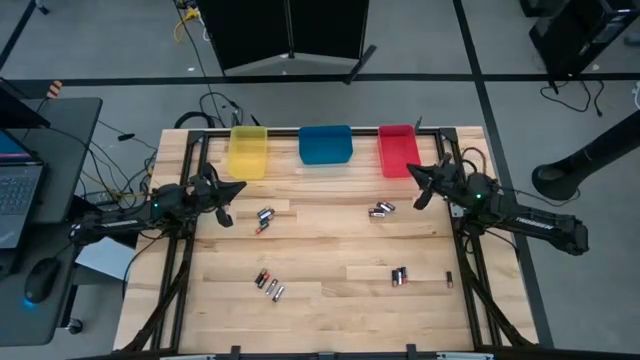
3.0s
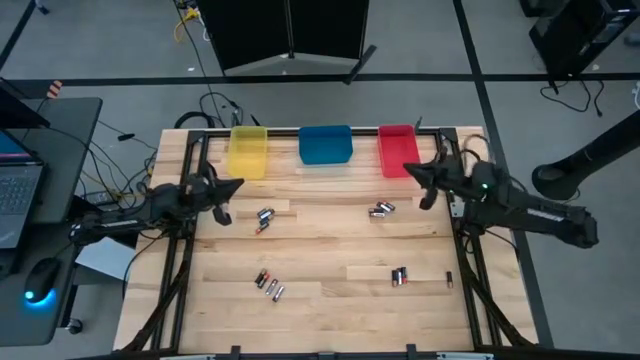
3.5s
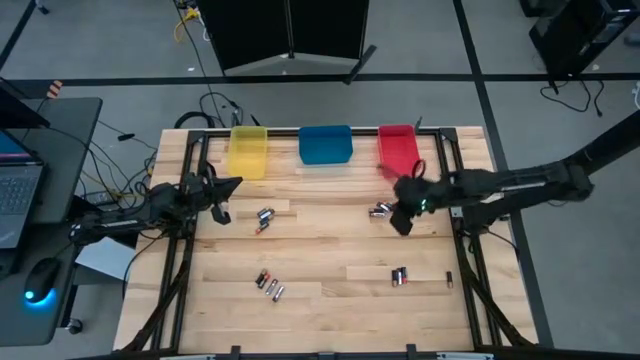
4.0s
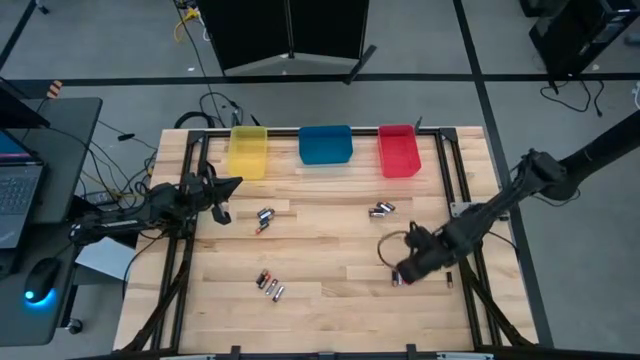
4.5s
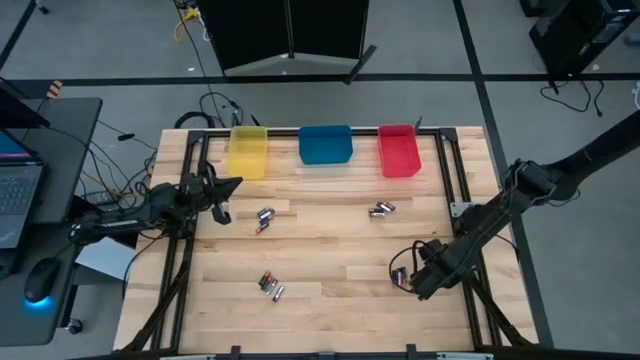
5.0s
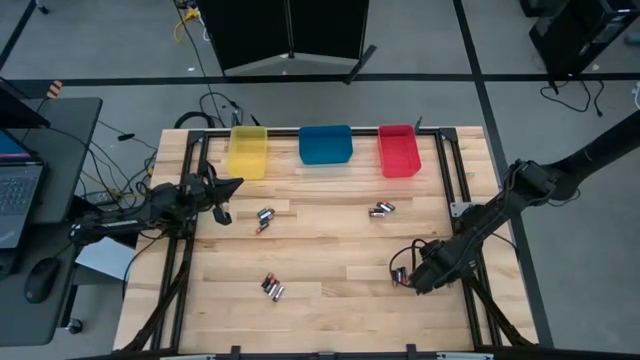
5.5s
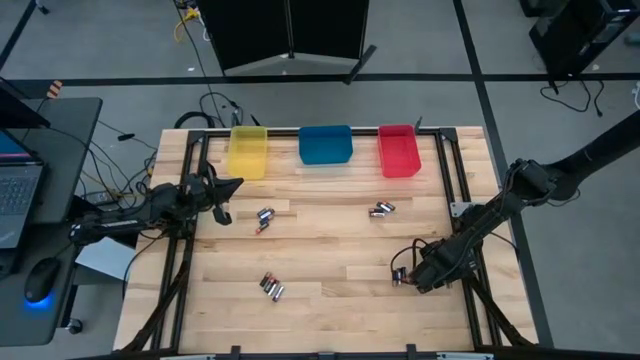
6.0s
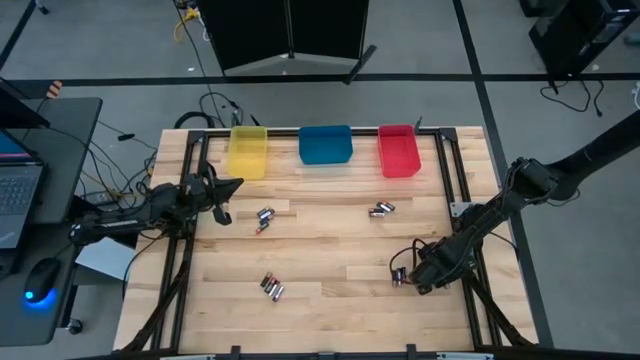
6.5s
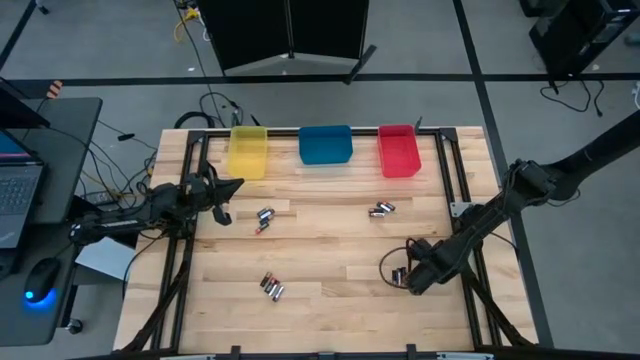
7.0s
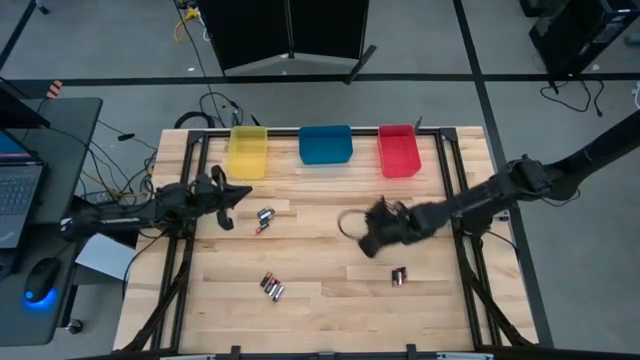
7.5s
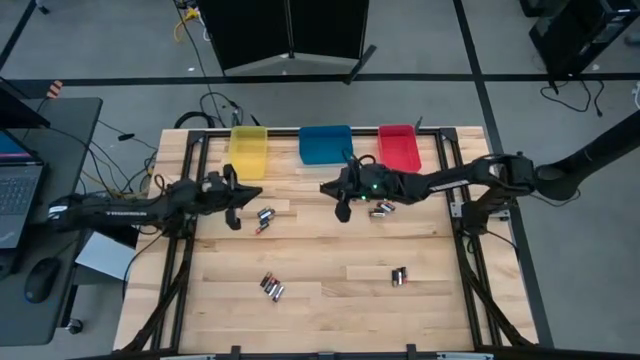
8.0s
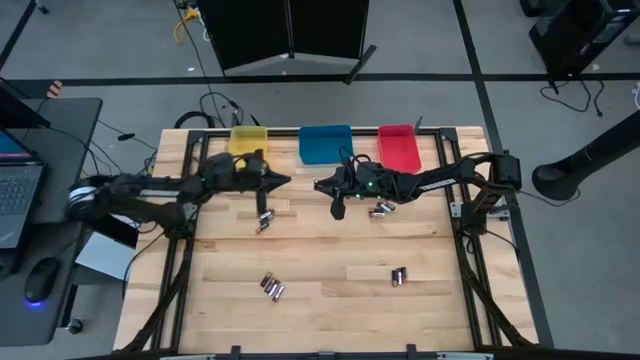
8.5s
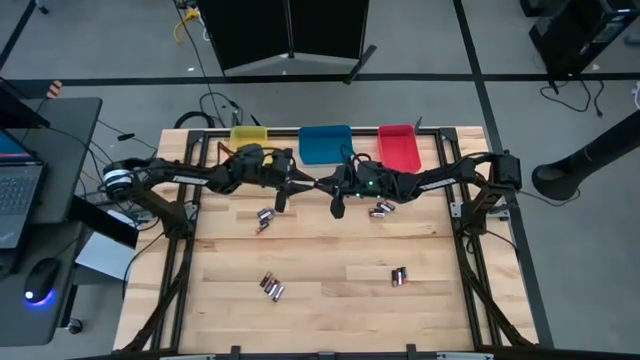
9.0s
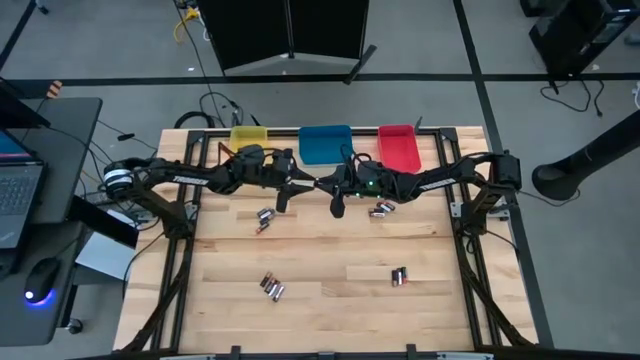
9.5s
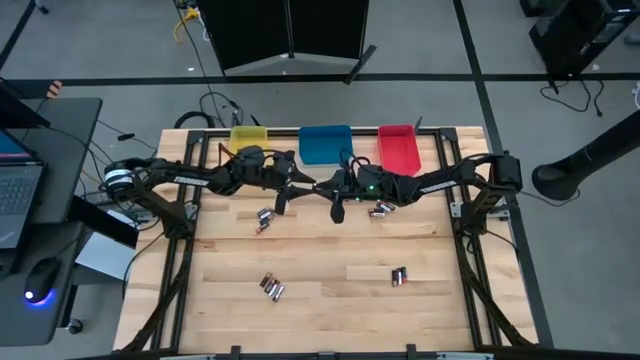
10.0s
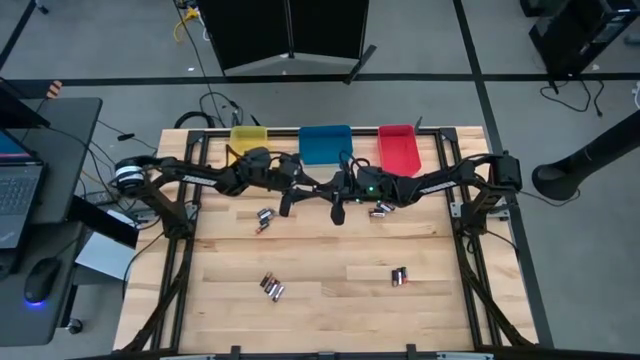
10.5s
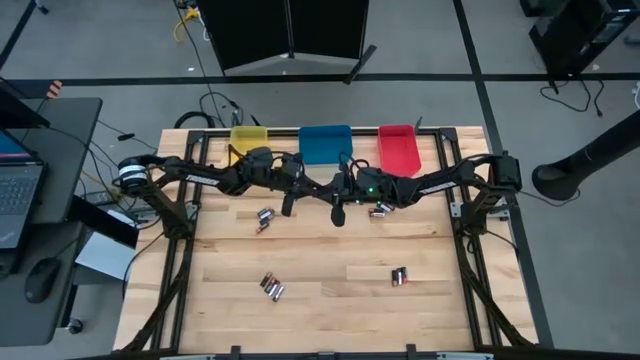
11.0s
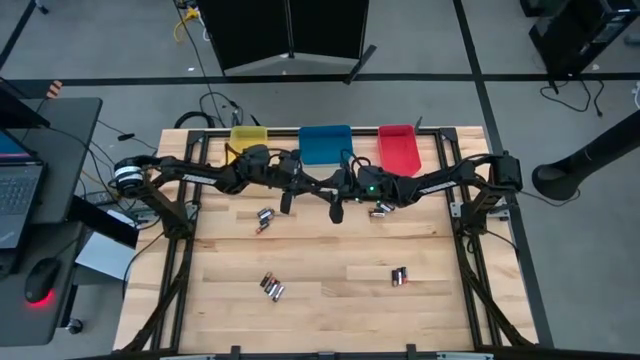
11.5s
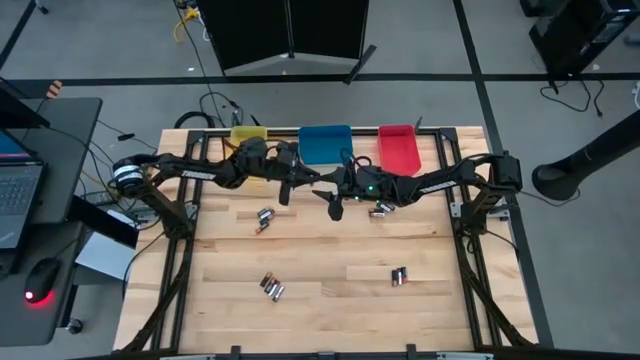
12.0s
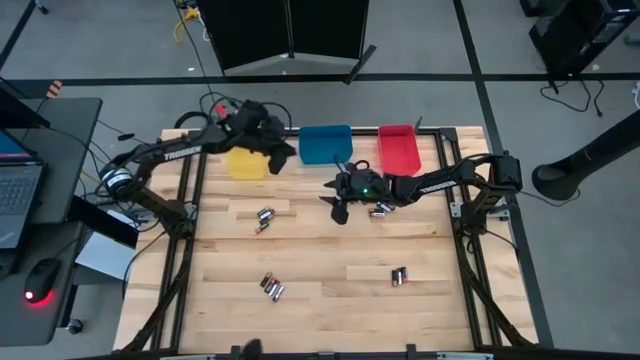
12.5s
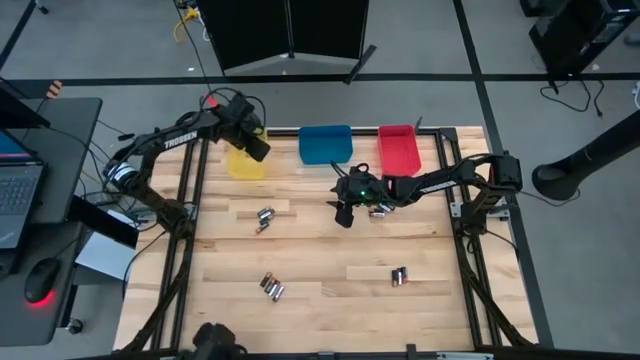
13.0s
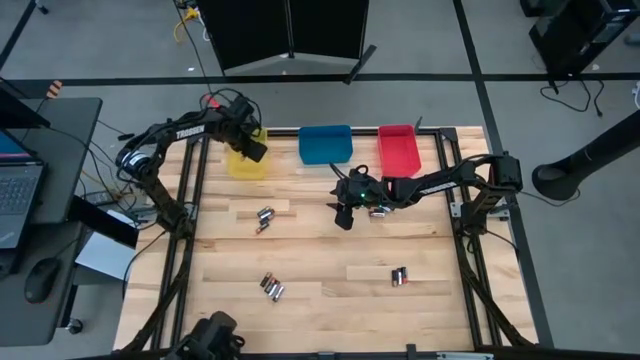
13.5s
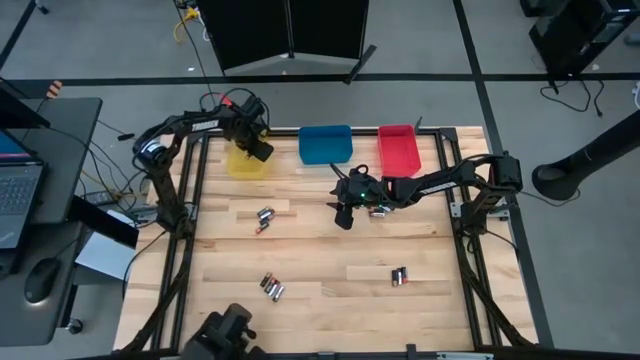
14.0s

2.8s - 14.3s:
Task: Sort batteries
Put the black battery into the yellow bin

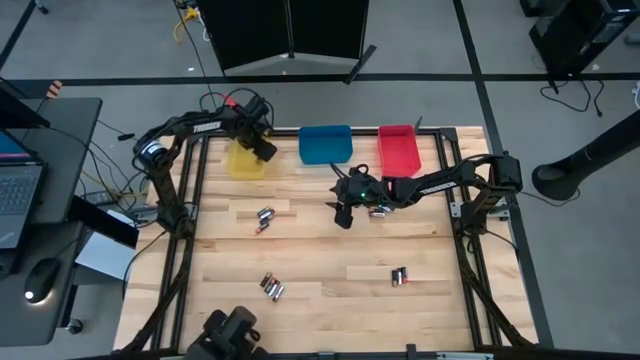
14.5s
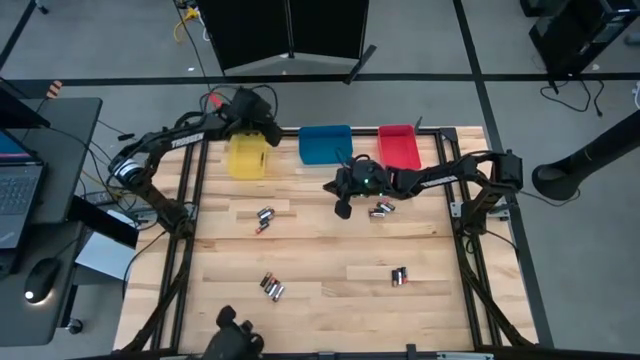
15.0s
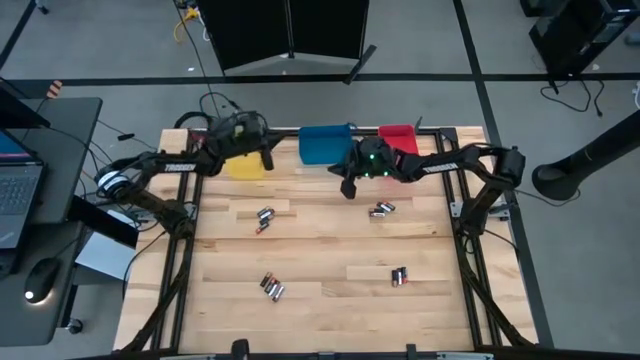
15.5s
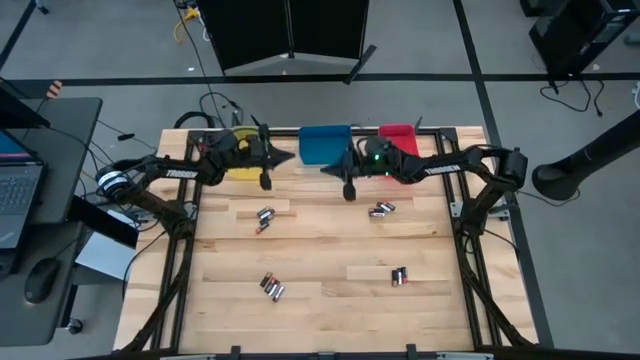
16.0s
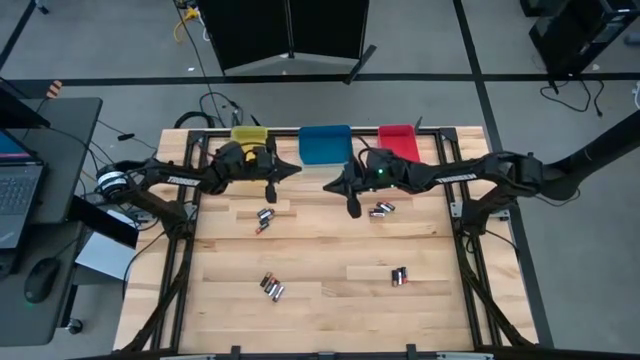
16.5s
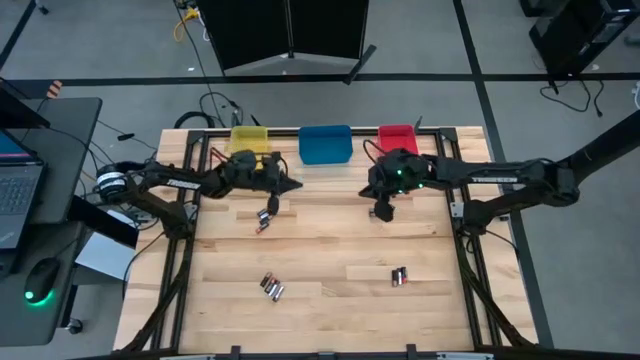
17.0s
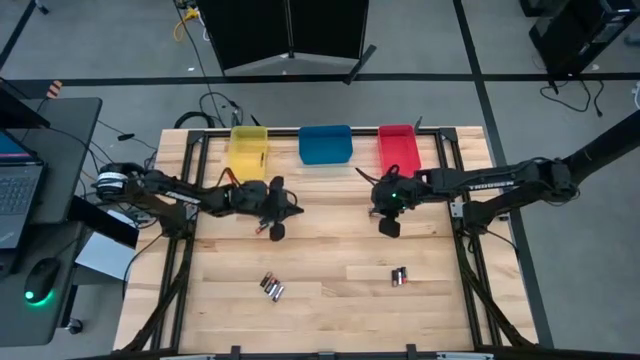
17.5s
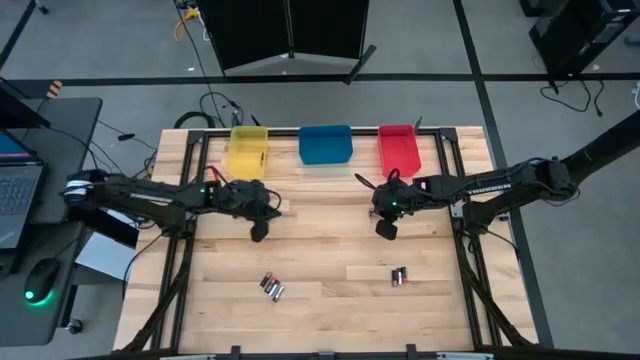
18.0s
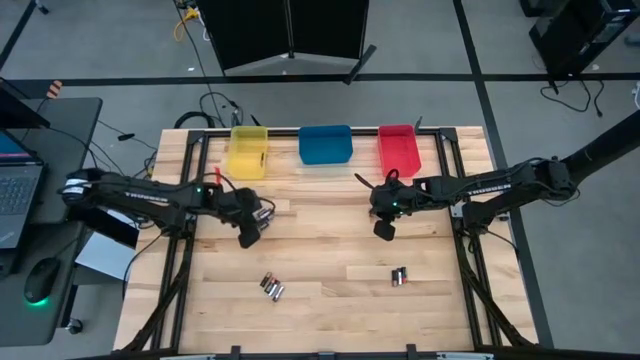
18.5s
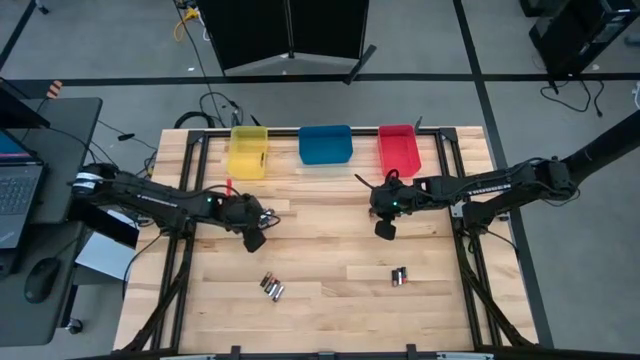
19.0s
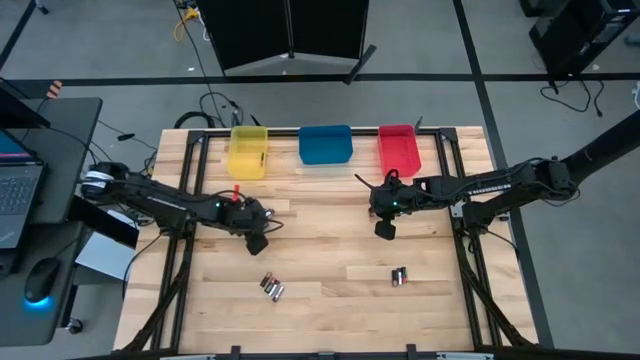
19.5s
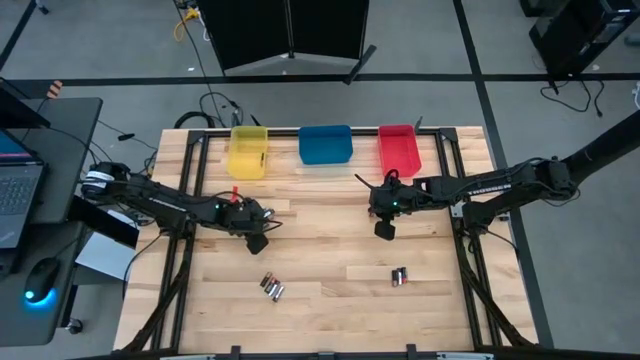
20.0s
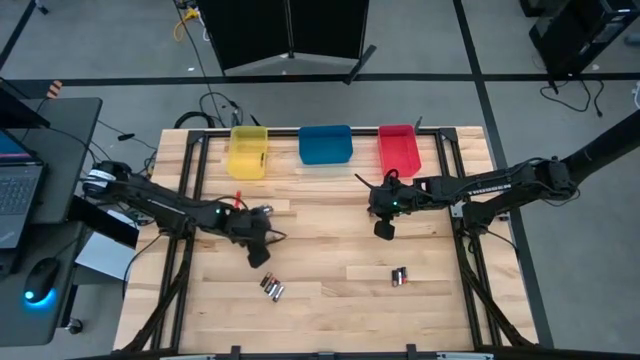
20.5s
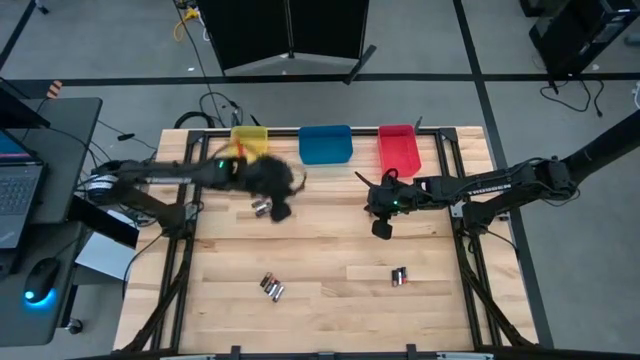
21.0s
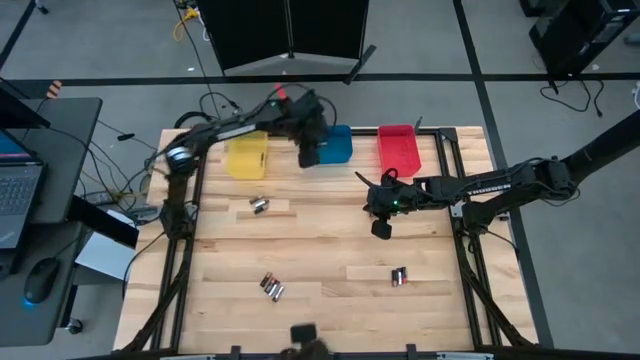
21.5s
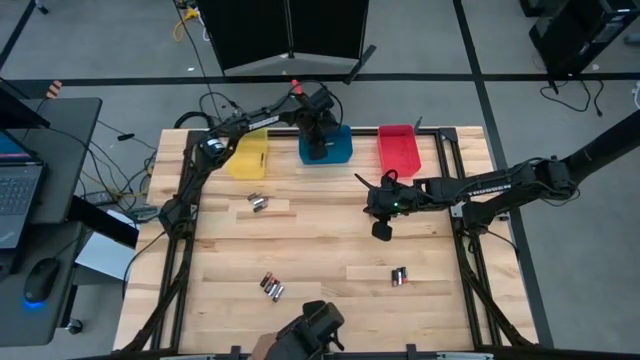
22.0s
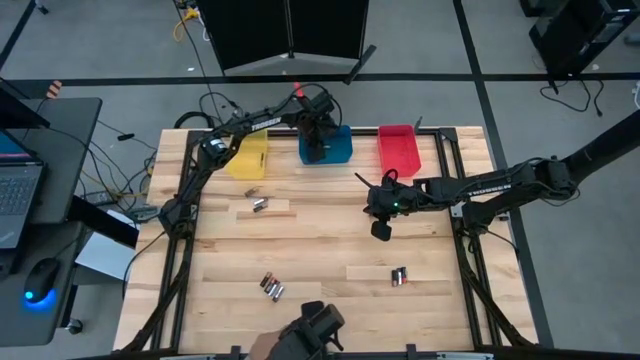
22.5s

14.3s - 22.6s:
Put the black orange battery into the blue bin
